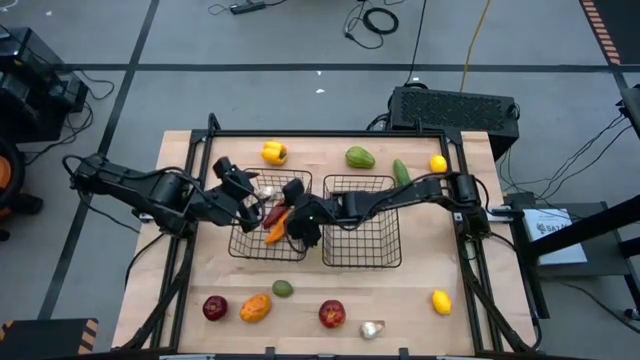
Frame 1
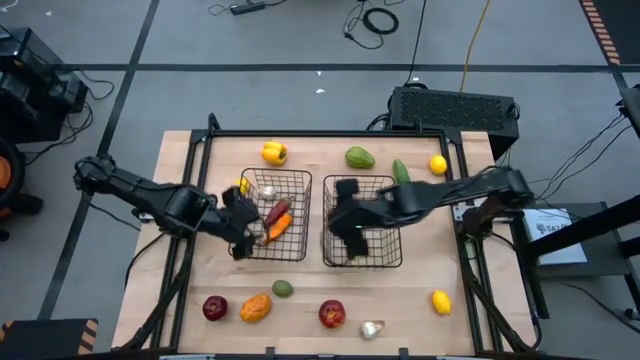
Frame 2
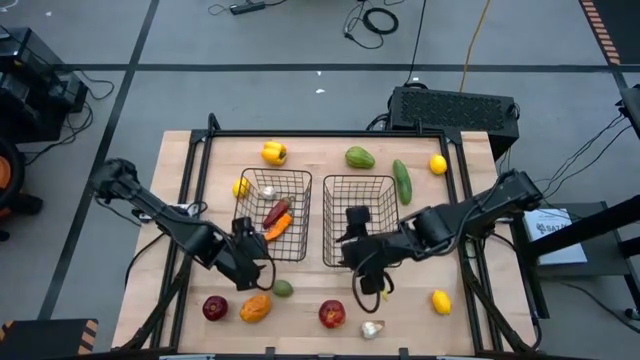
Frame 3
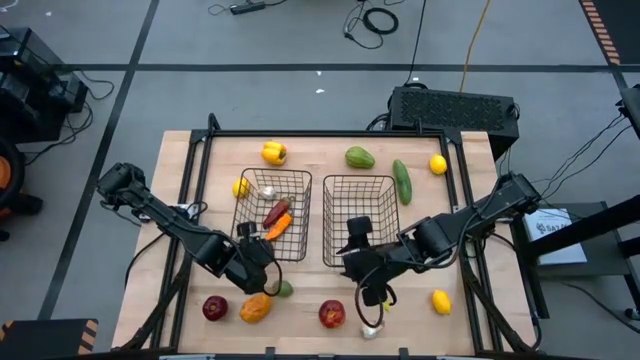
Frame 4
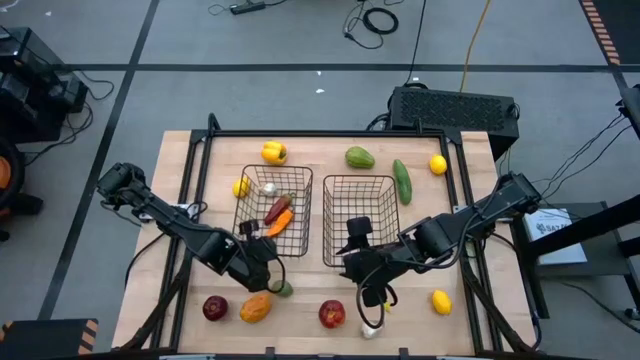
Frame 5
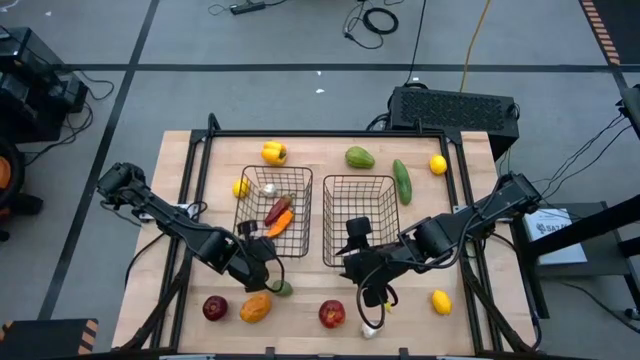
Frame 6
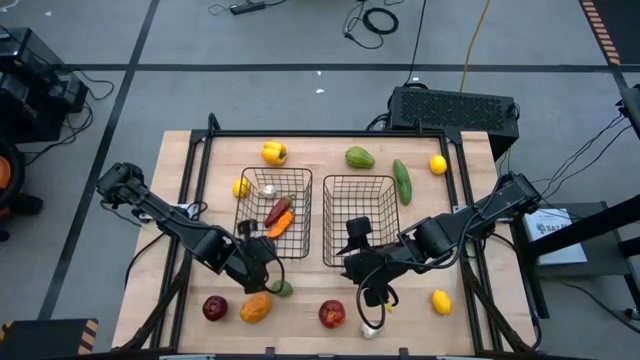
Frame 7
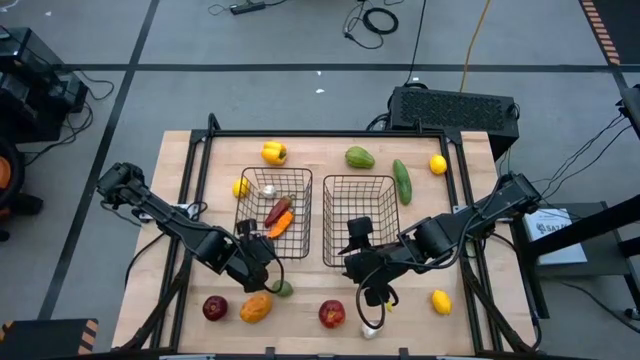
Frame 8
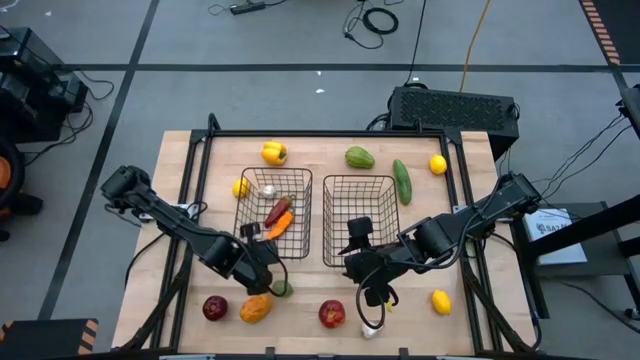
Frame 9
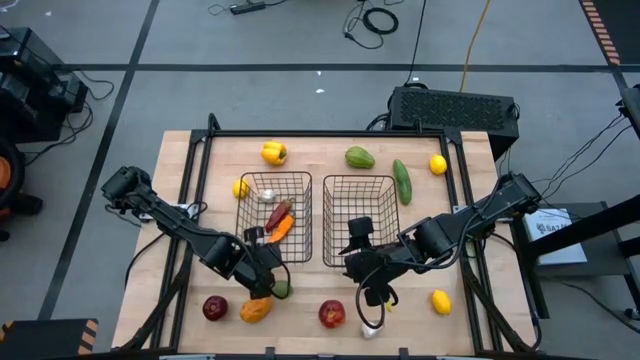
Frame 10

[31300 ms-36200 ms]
Task: Sort produce into baskets
Adjust the left black wire basket

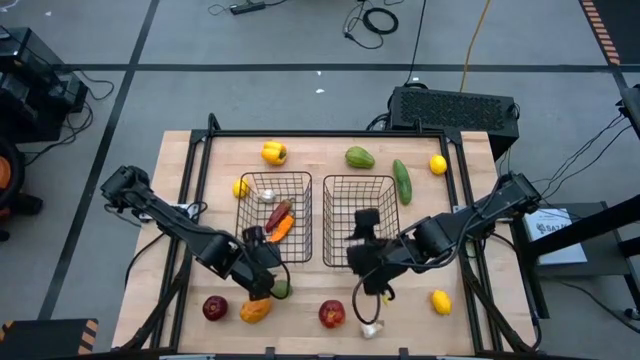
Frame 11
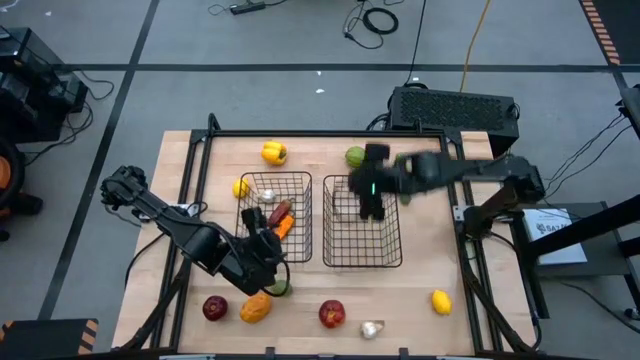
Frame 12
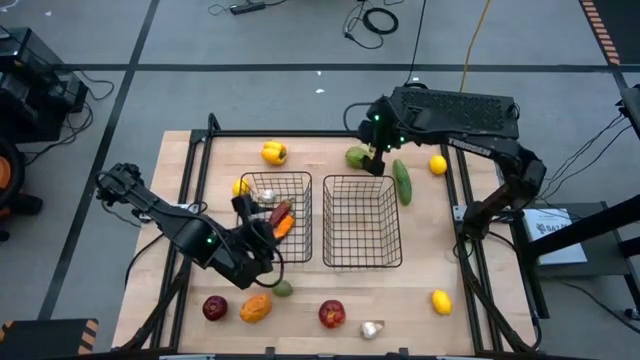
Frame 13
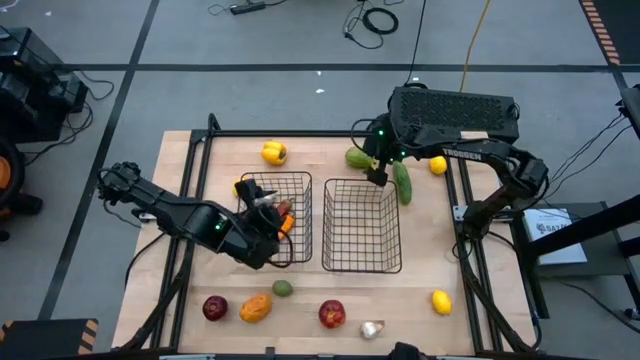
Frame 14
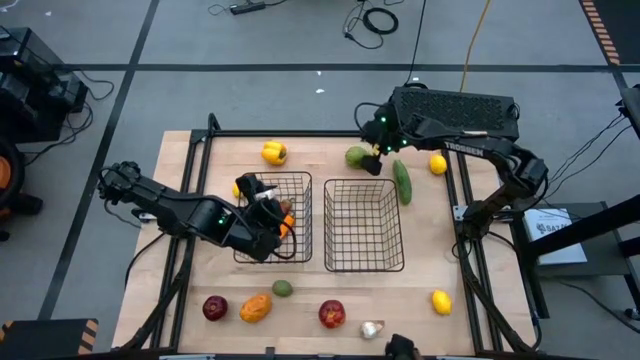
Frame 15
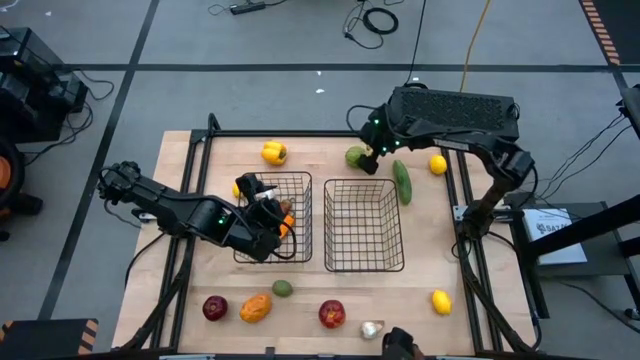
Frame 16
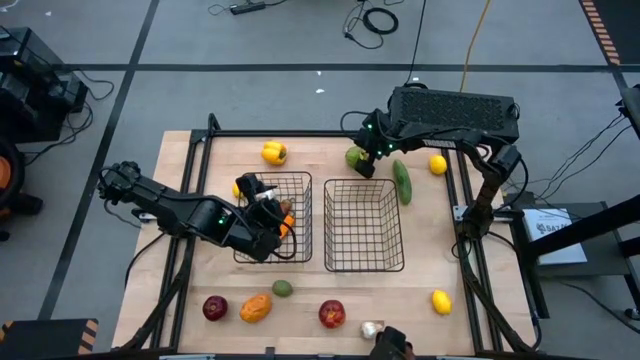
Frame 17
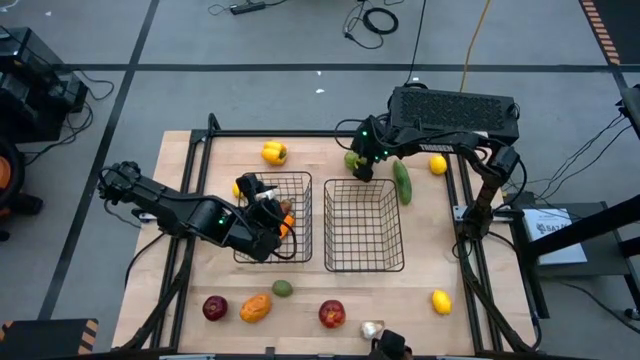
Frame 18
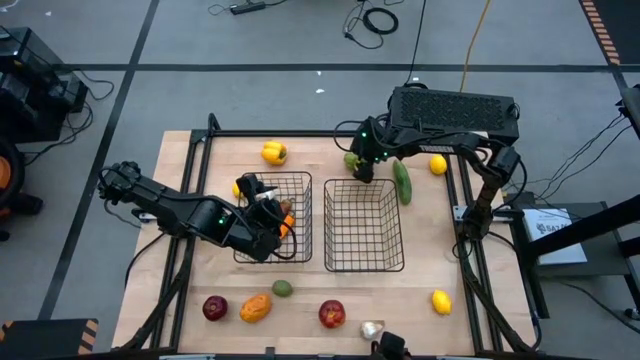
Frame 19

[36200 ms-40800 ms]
Put the green chayote into the left black wire basket

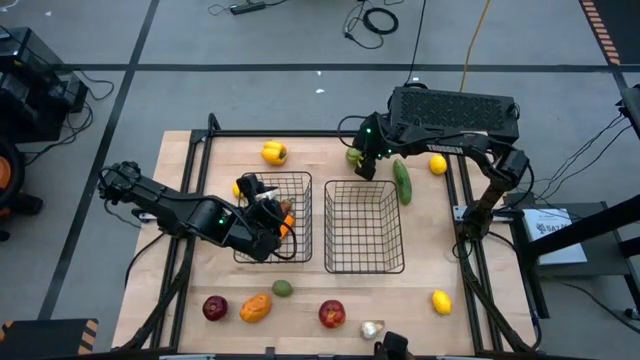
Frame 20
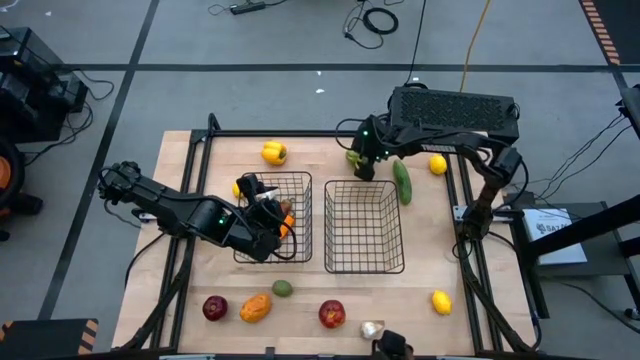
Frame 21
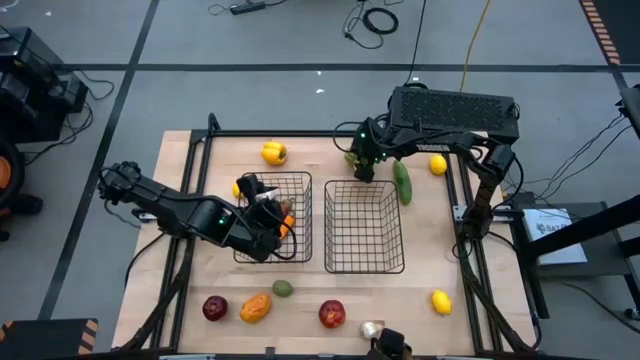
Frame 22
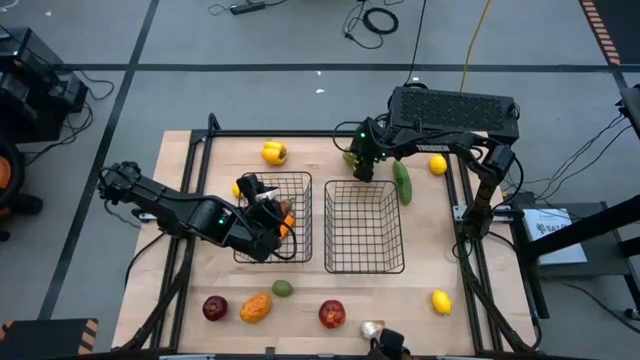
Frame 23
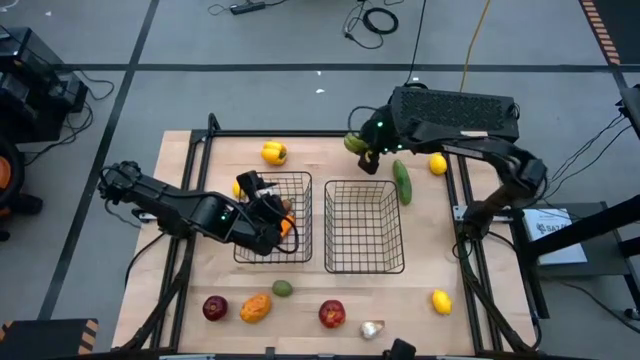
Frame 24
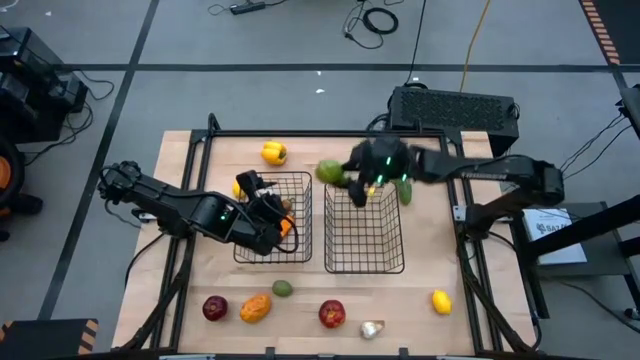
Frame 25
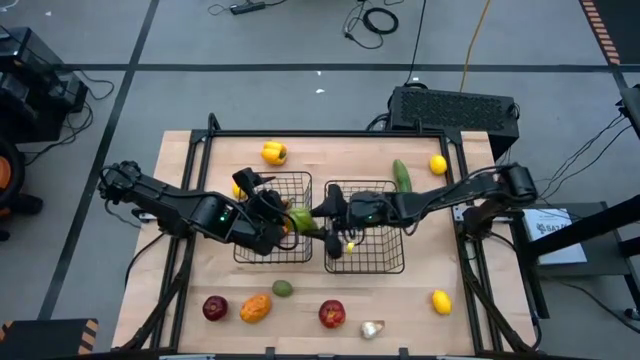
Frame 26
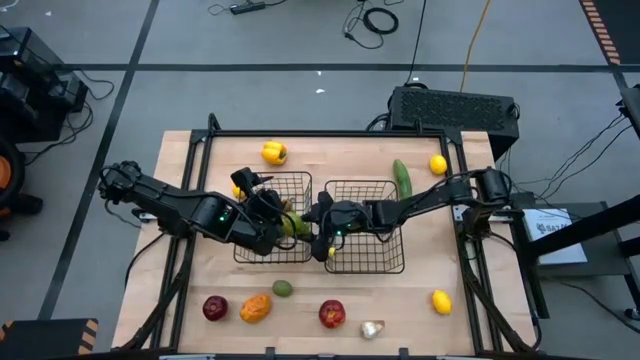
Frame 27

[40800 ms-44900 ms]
Put the green chayote into the left black wire basket

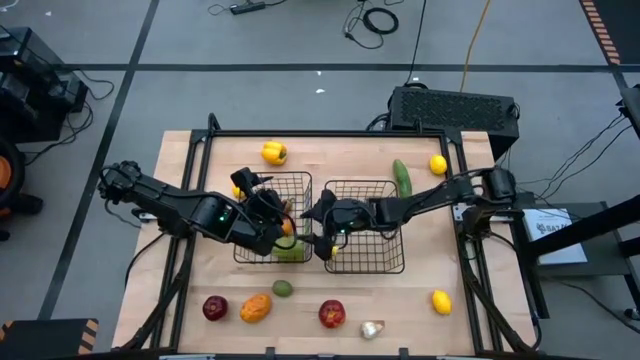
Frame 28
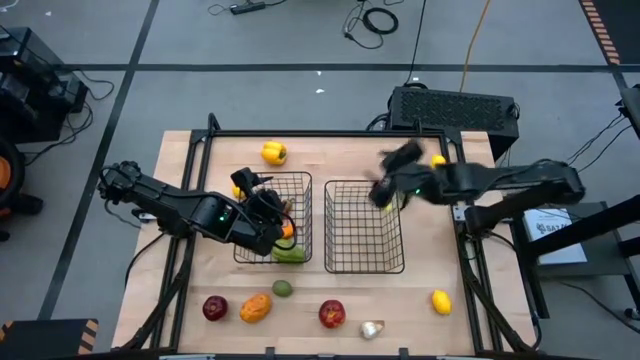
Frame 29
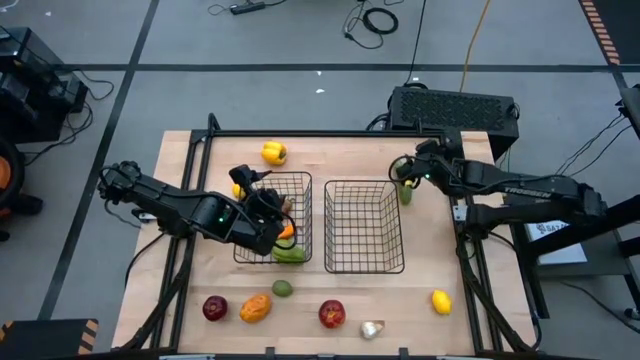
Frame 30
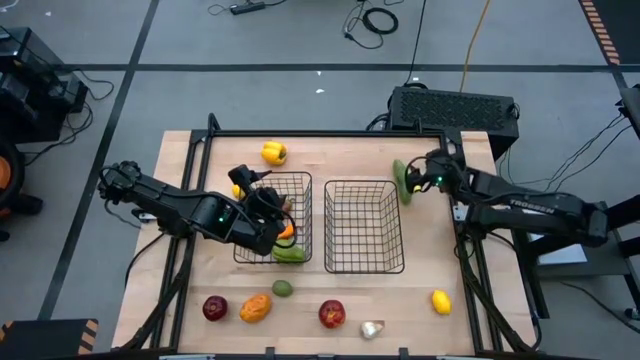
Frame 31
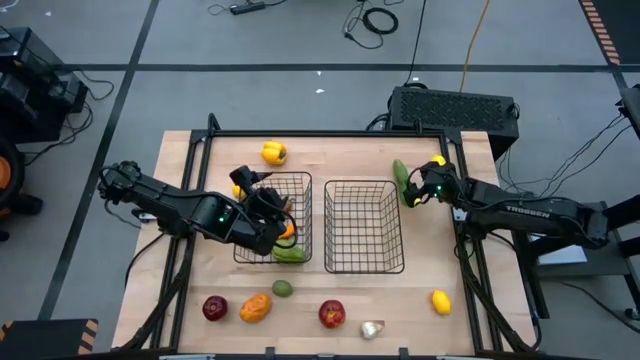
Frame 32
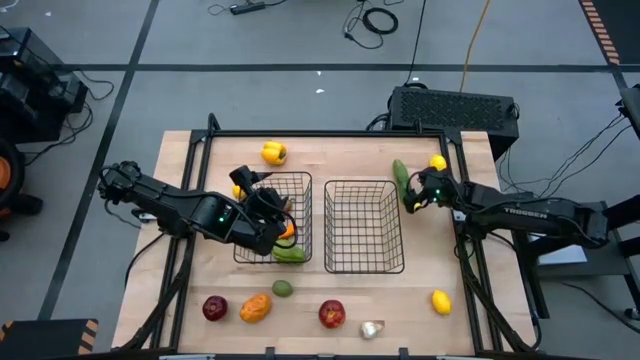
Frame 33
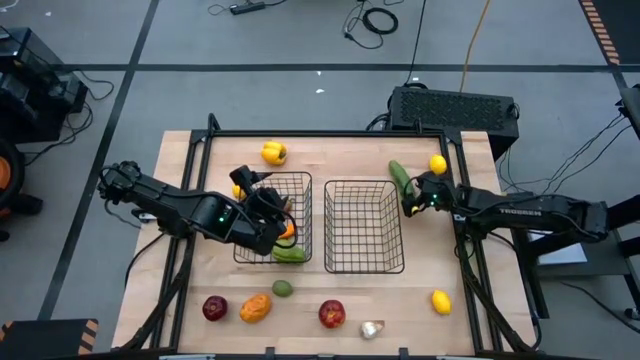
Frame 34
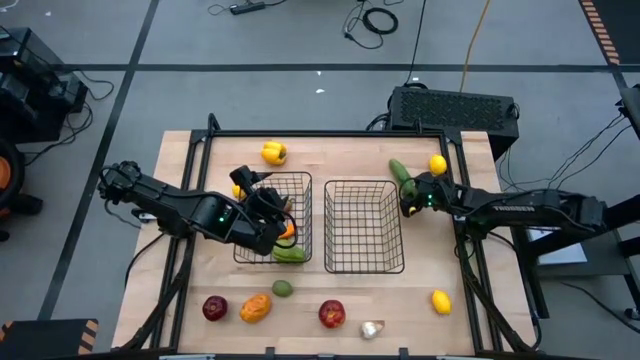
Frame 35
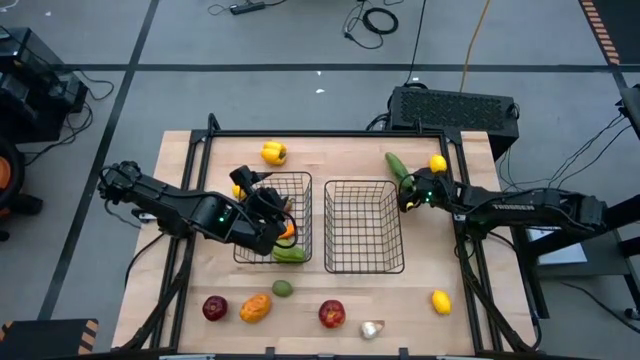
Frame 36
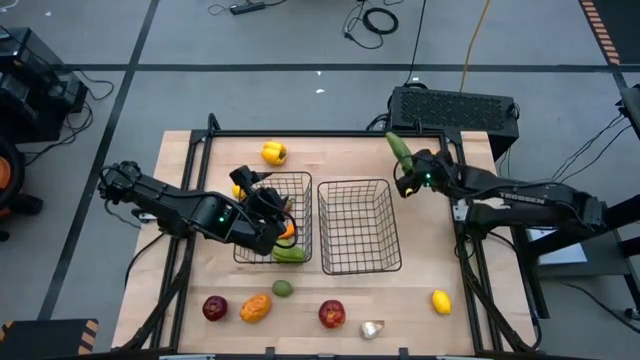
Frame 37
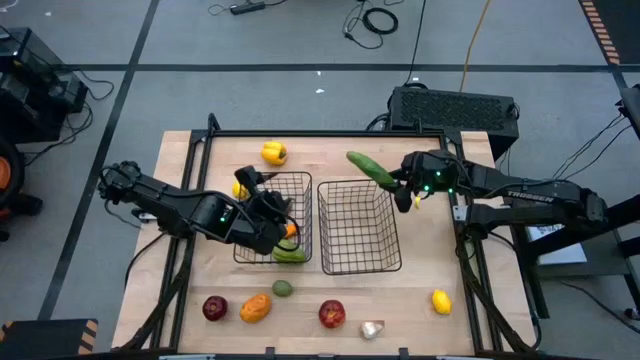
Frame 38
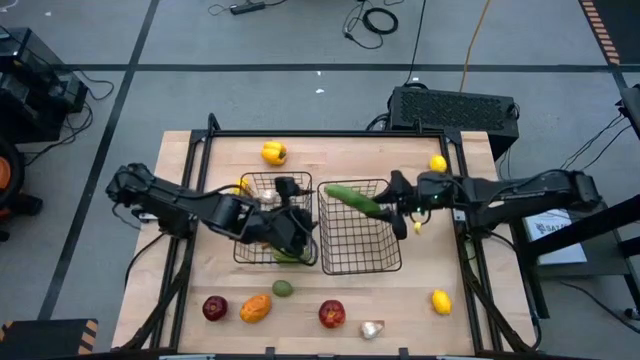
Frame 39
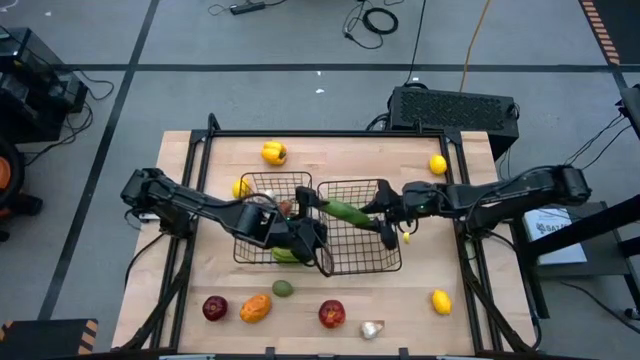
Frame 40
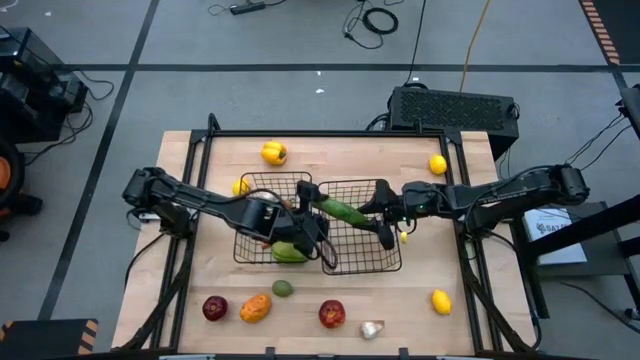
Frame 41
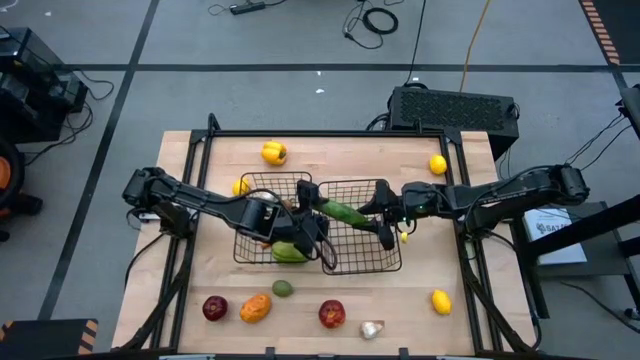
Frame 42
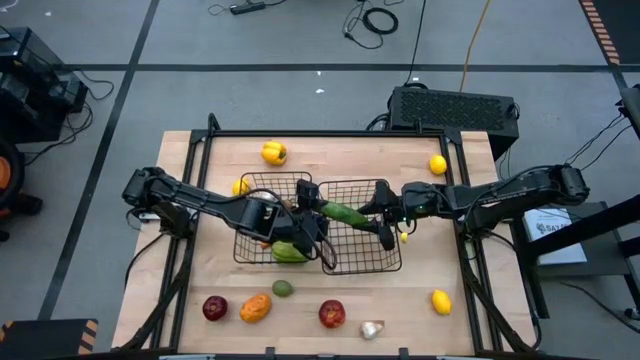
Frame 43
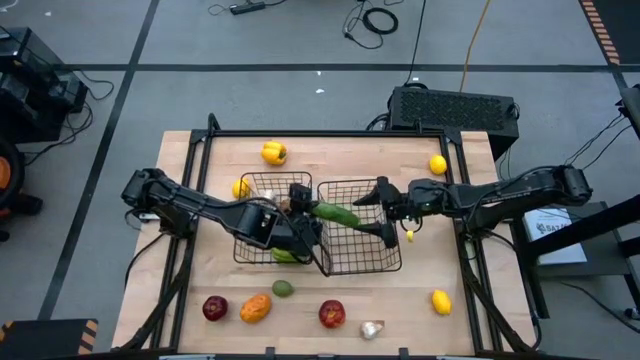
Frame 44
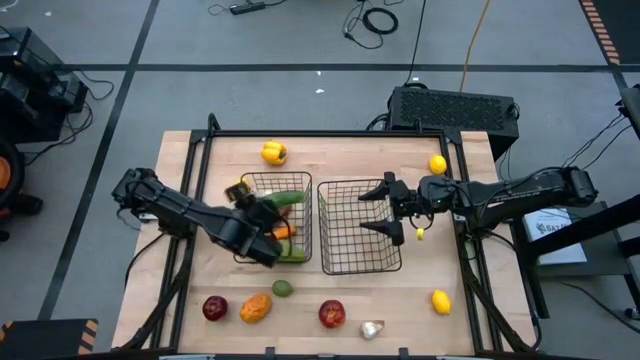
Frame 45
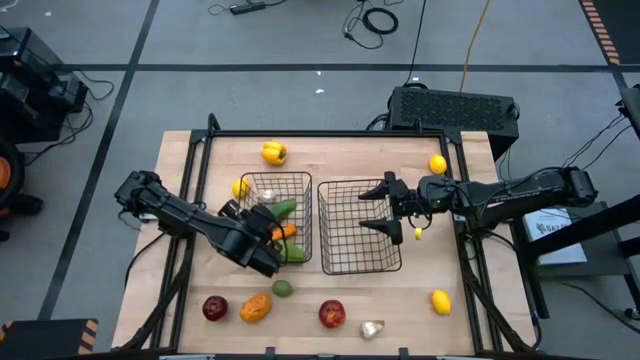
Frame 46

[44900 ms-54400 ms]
Put the green cucumber into the left black wire basket
